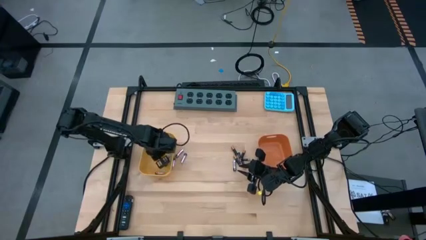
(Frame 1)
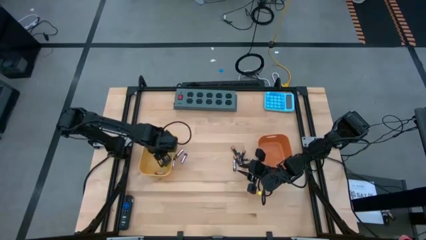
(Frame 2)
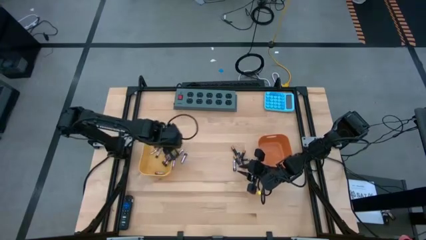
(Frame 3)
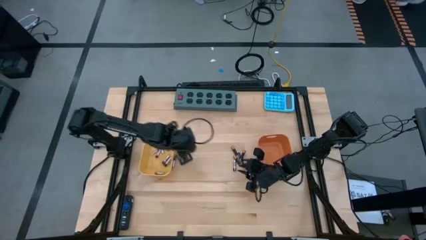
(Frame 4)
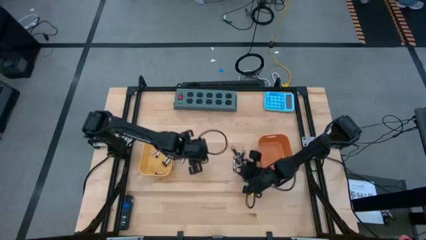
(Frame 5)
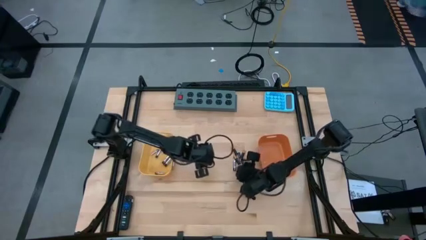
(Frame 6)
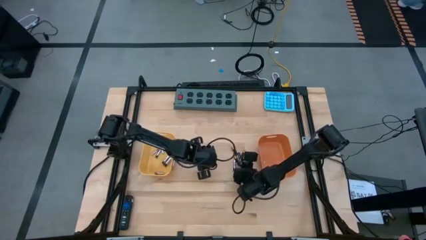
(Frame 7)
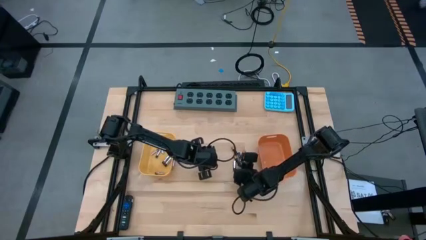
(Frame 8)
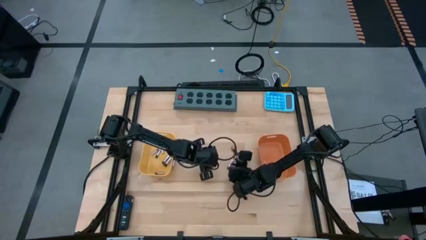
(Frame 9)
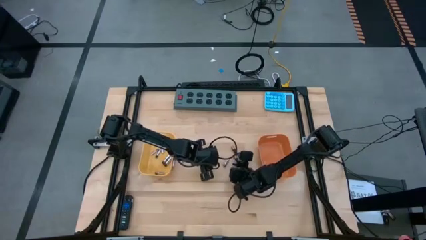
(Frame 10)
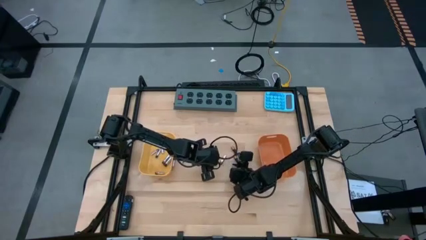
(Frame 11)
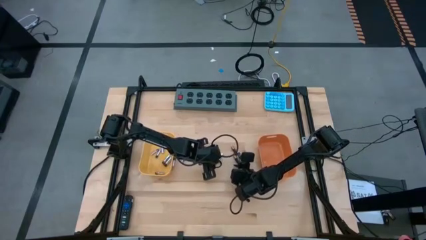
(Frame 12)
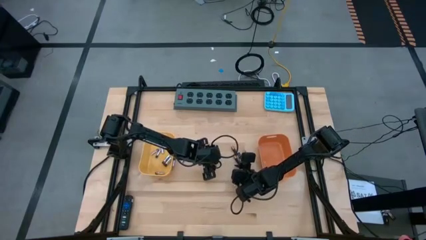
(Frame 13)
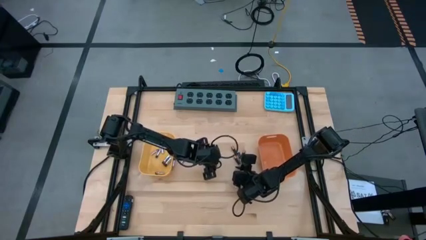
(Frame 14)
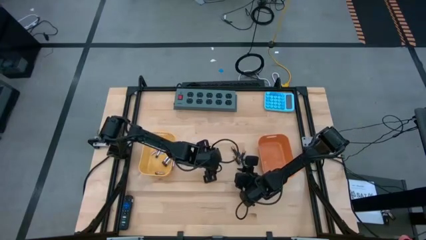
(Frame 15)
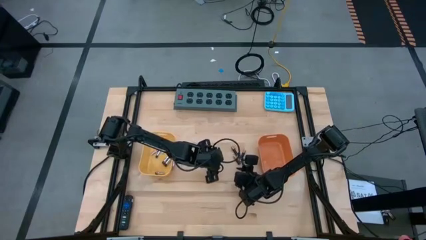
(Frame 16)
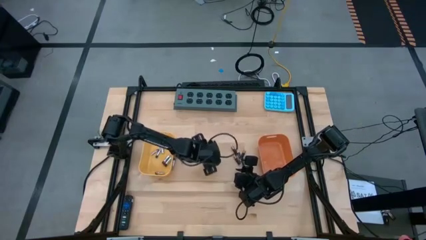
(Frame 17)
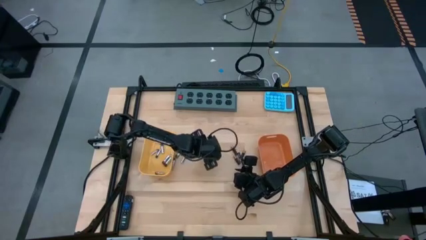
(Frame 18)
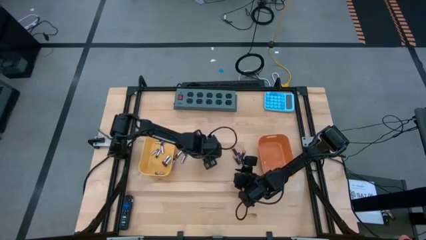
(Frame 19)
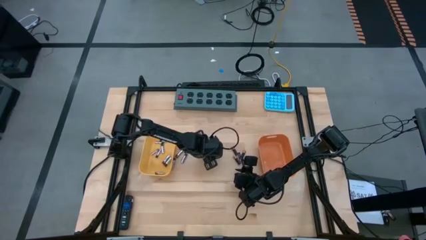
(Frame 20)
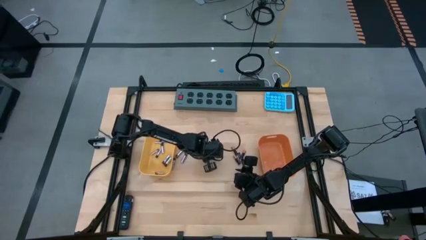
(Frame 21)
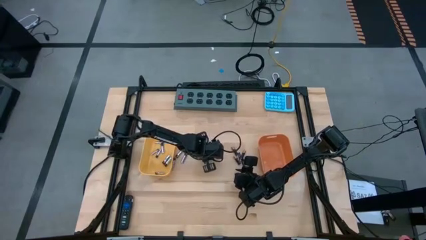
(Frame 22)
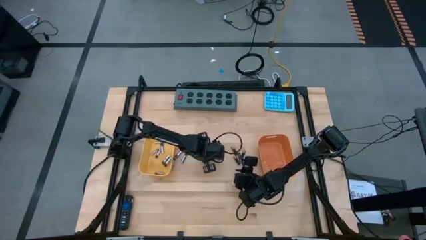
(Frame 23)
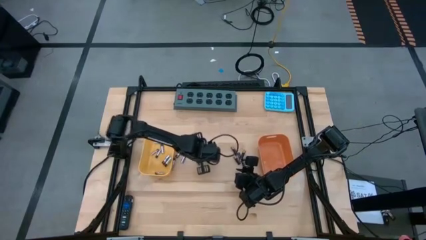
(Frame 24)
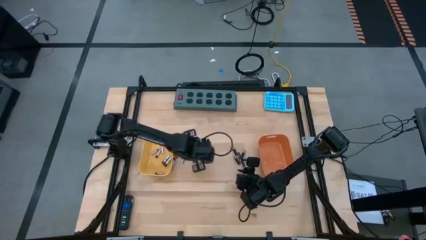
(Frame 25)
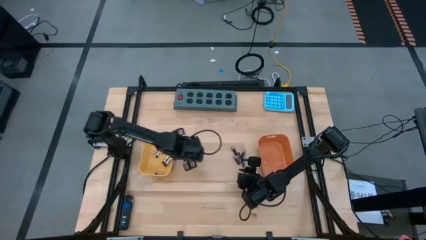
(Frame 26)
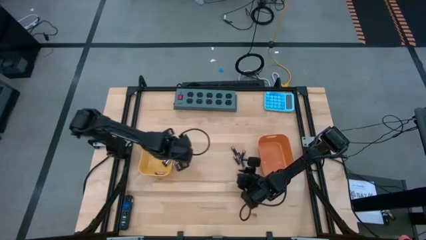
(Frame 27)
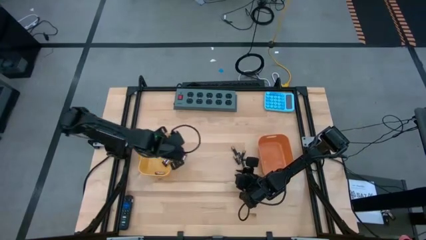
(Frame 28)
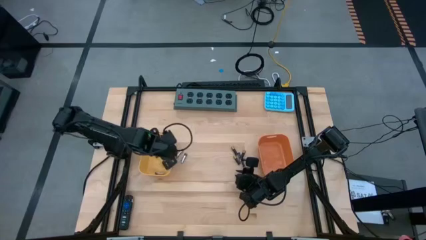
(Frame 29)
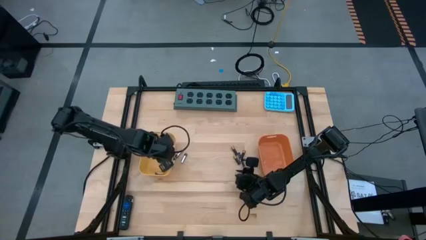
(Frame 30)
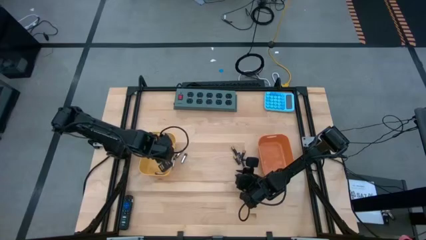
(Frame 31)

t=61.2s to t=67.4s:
Task: Sort batteries
Put the silver battery into the yellow bin

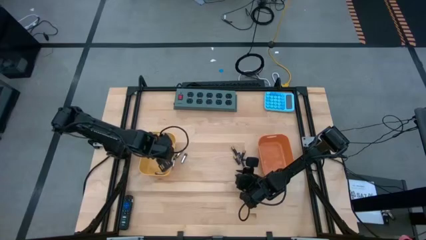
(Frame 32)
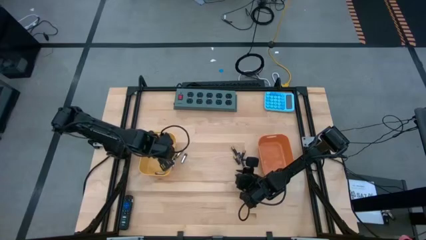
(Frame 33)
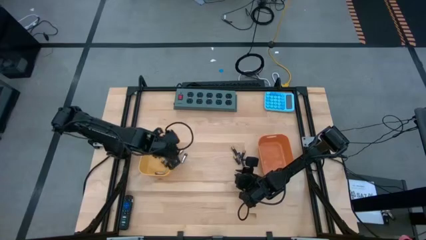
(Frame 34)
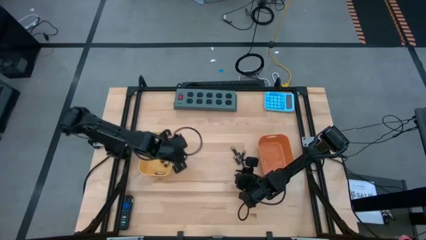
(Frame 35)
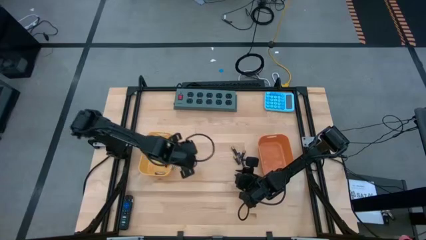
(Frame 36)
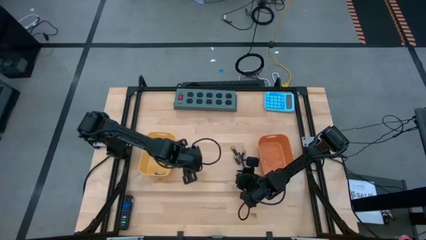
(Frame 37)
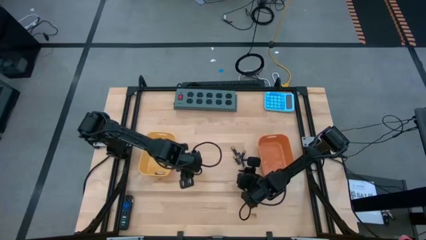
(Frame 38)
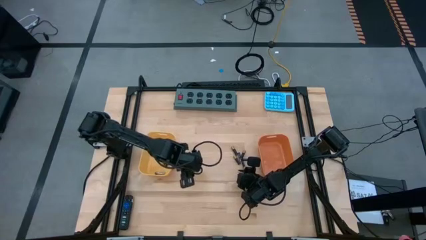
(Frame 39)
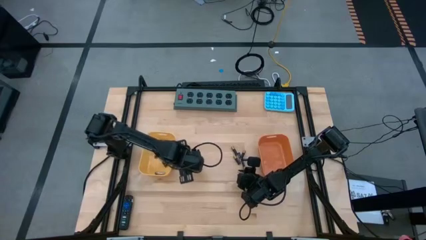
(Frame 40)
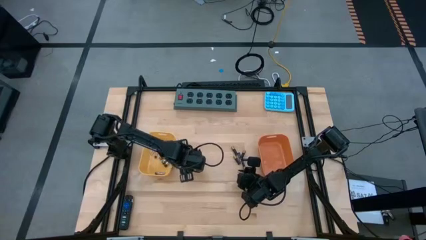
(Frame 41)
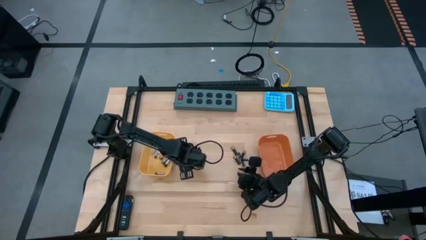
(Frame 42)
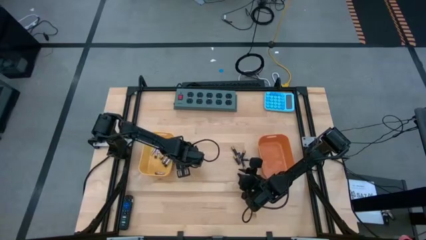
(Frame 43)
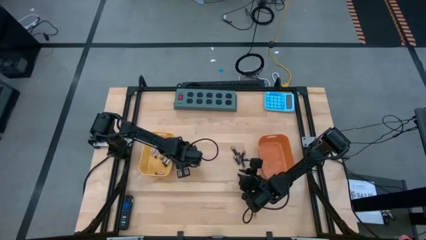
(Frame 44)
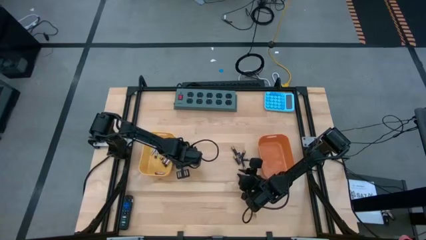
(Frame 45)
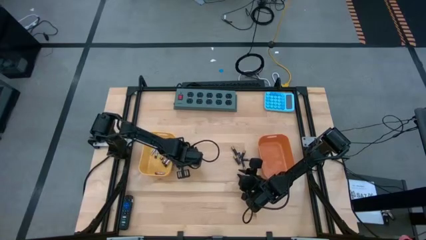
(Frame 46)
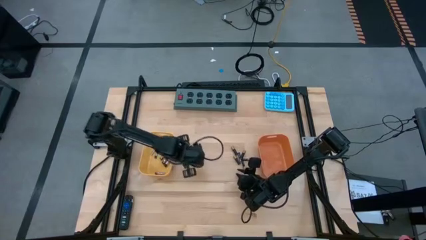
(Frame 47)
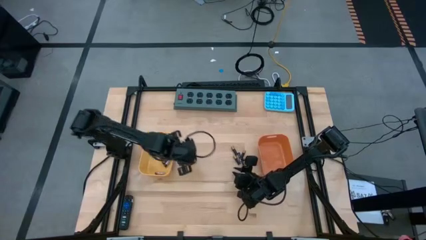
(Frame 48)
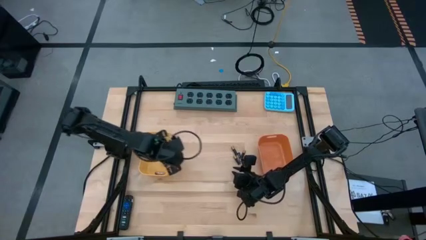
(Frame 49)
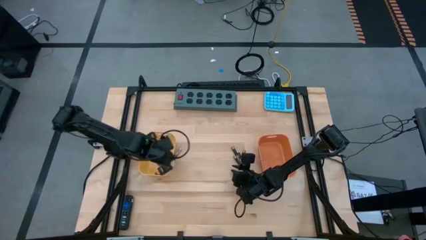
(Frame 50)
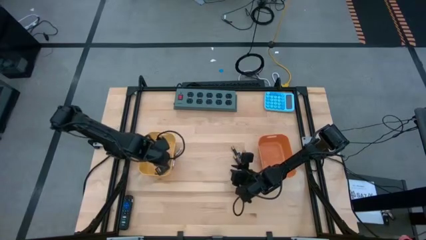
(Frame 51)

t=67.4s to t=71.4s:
Put the silver battery into the yellow bin

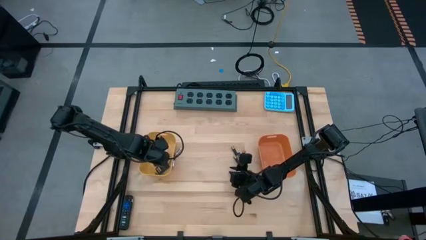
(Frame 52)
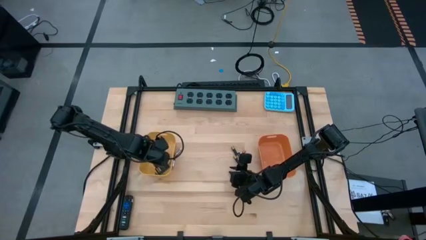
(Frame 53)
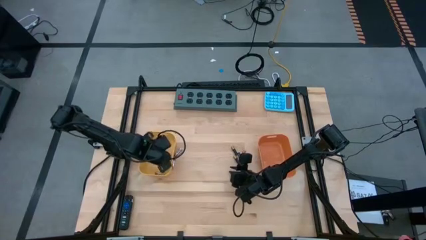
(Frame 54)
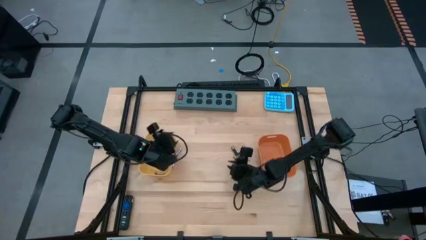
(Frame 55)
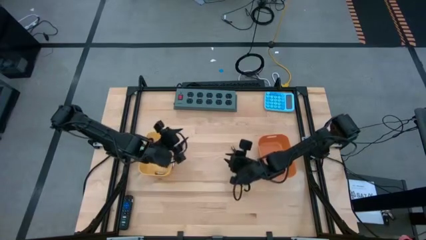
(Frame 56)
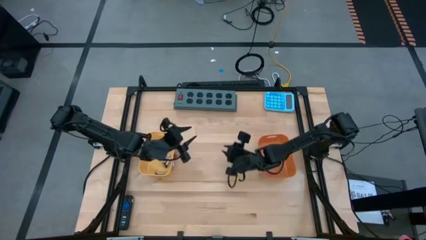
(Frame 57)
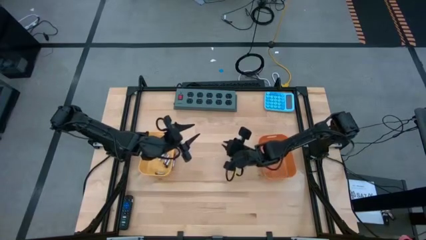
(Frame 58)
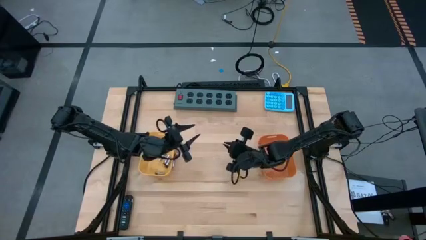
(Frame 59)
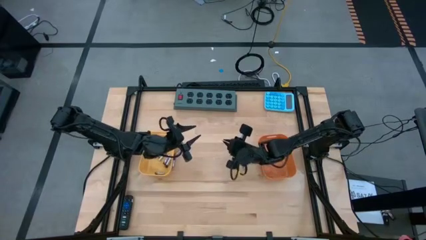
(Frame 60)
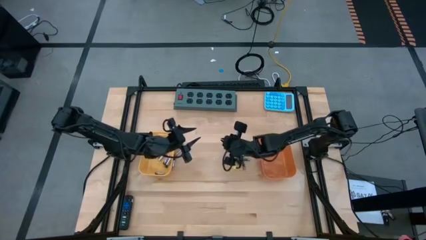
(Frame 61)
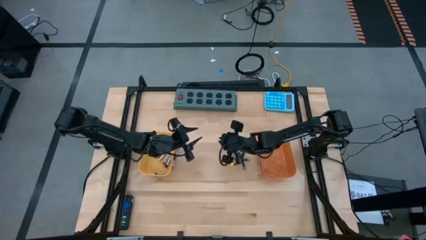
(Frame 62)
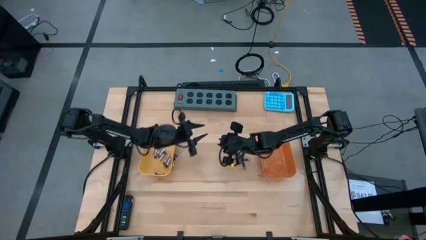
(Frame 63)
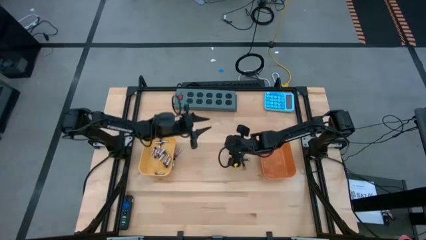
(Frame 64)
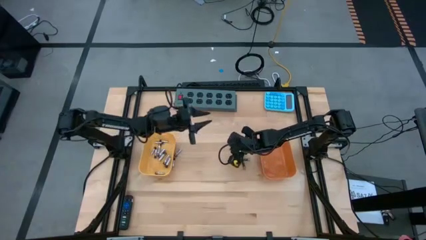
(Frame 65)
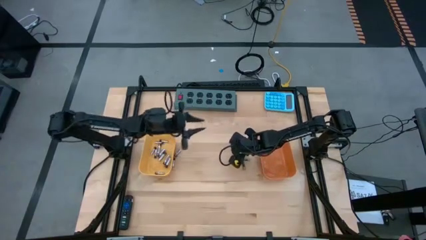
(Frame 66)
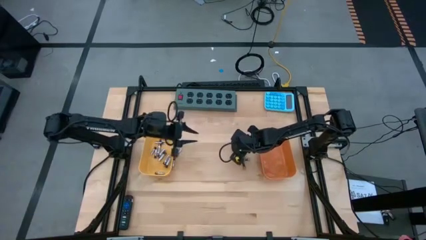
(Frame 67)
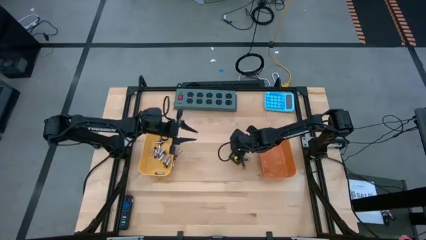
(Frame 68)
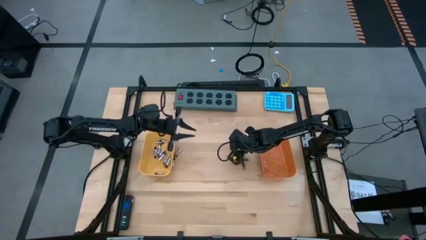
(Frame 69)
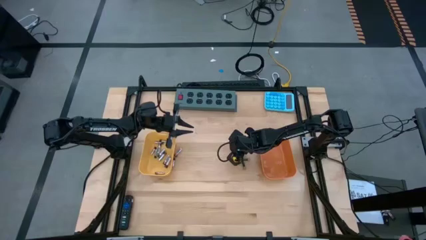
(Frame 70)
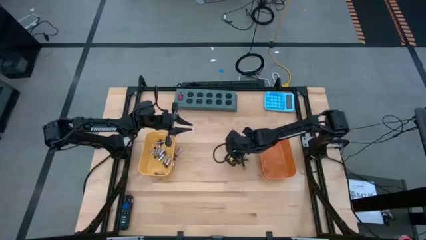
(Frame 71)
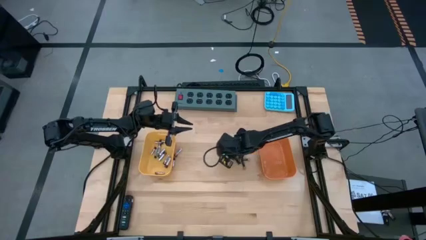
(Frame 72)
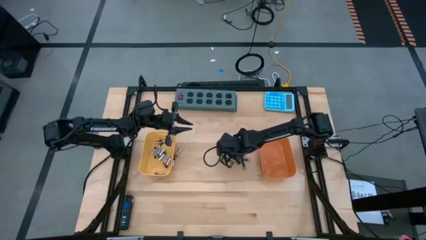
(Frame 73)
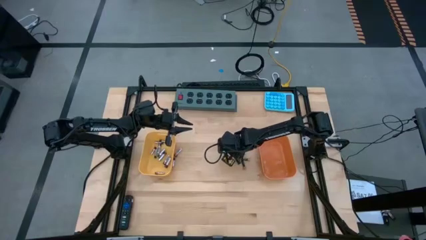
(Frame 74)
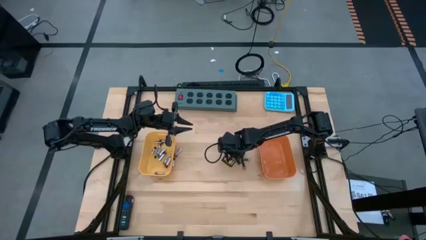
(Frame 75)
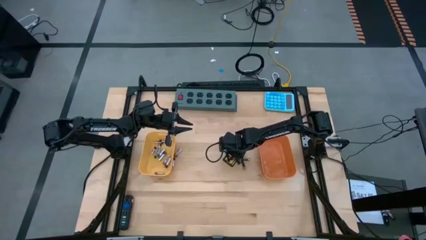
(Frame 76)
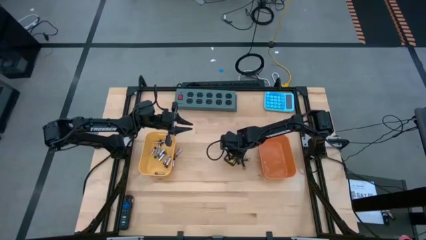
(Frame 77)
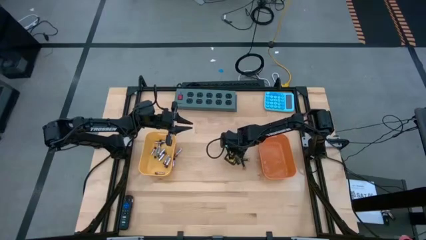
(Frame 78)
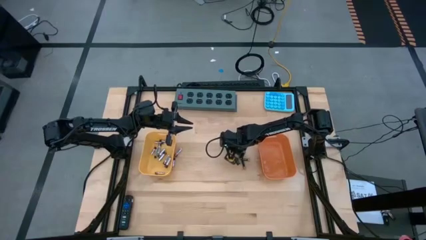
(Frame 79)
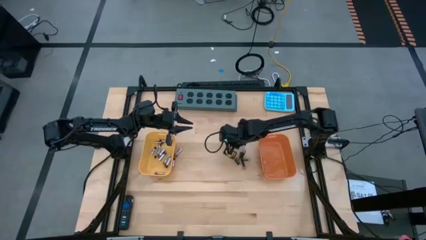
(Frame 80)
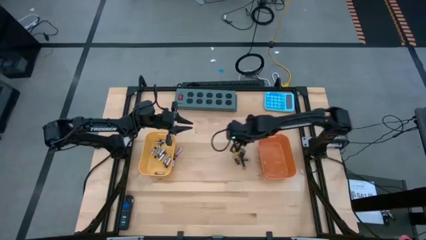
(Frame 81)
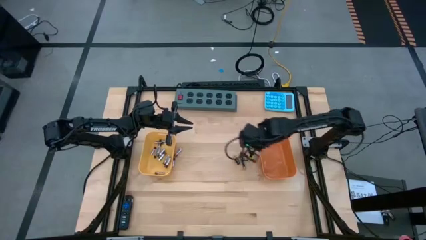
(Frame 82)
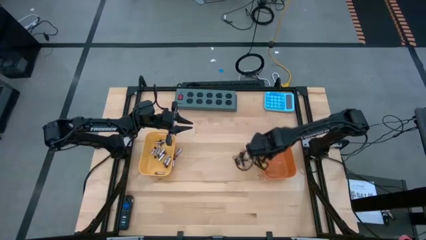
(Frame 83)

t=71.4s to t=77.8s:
Put the black battery into the orange bin

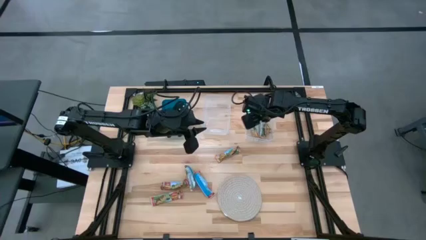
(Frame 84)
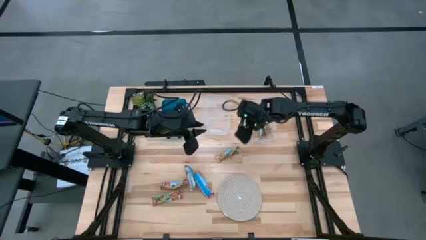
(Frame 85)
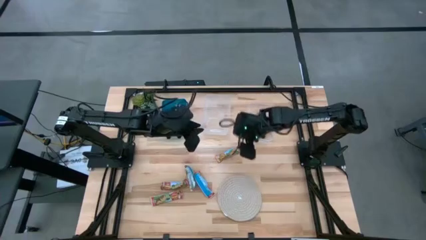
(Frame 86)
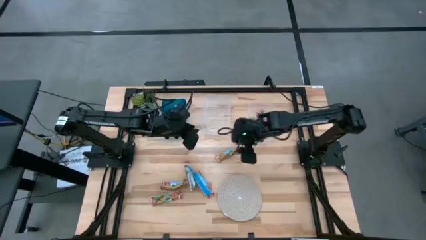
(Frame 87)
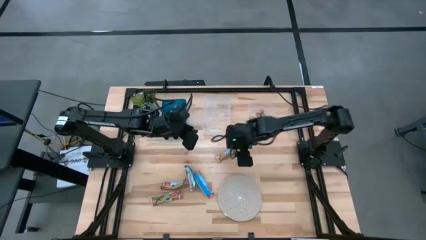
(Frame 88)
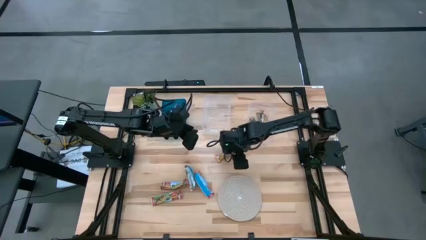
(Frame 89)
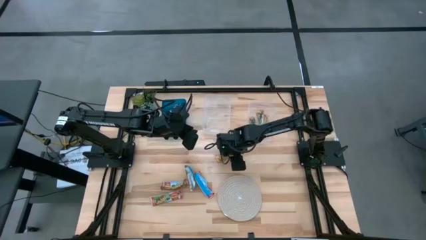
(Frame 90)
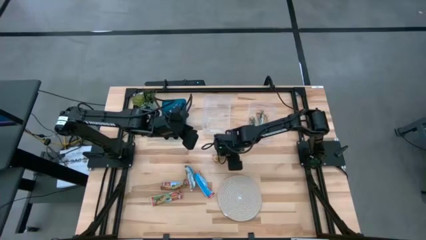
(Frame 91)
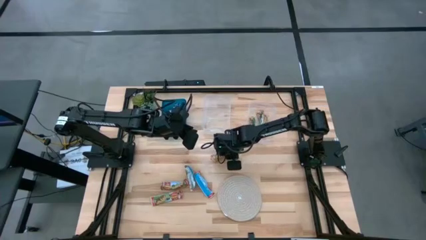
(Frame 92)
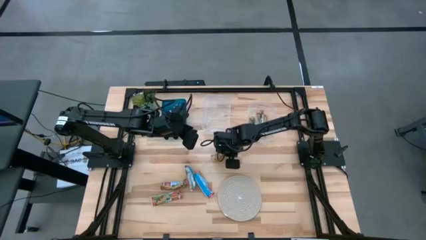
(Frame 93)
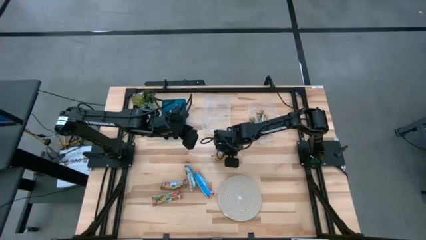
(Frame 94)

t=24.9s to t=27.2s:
Task: Pick and place Granola Bars by type
Put the yellow granola bar into the right transparent bin
